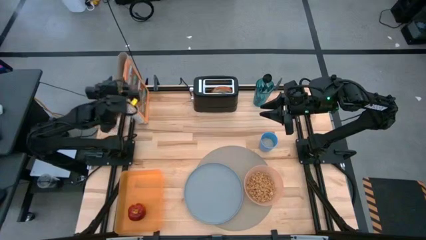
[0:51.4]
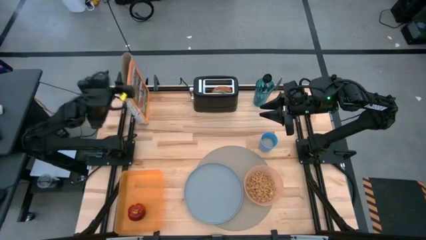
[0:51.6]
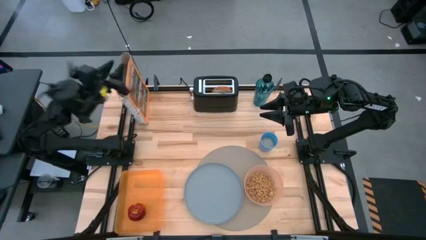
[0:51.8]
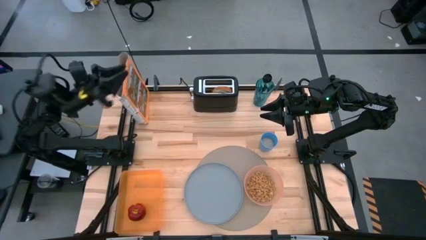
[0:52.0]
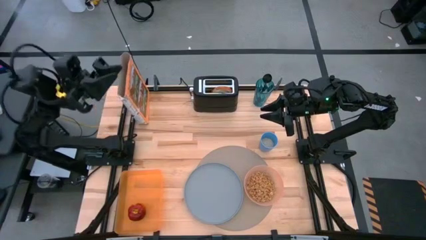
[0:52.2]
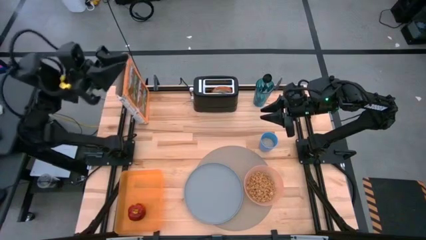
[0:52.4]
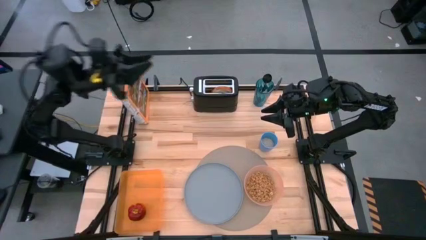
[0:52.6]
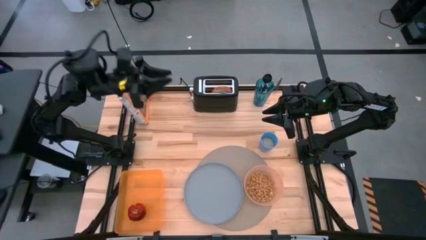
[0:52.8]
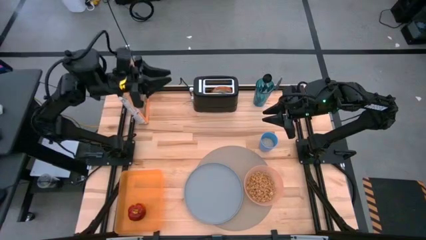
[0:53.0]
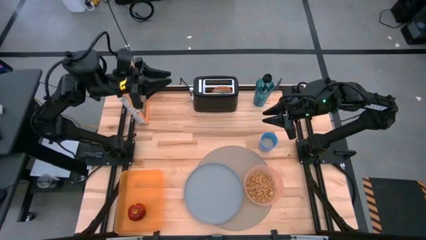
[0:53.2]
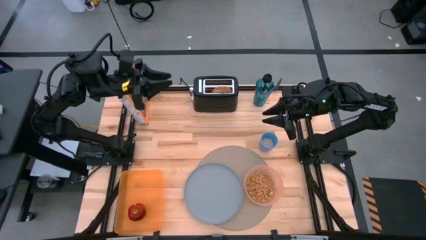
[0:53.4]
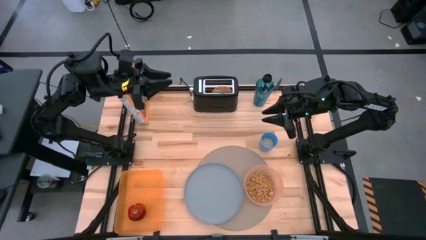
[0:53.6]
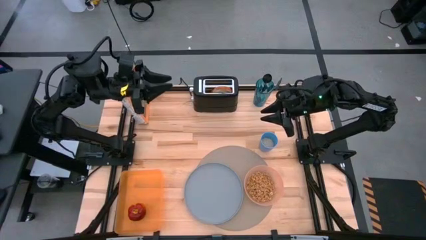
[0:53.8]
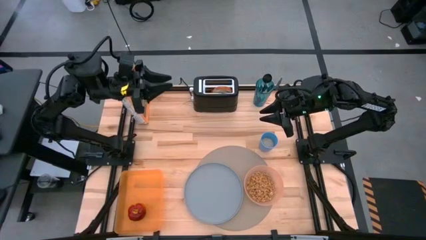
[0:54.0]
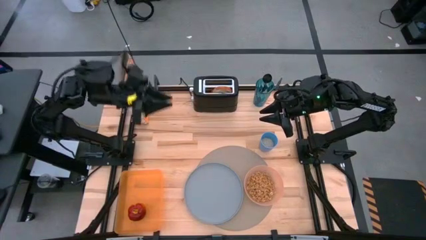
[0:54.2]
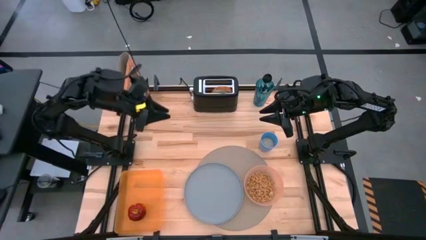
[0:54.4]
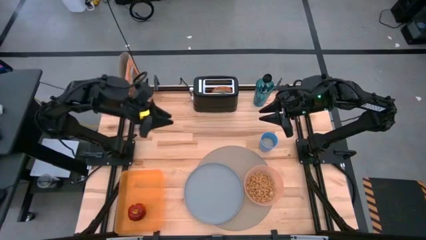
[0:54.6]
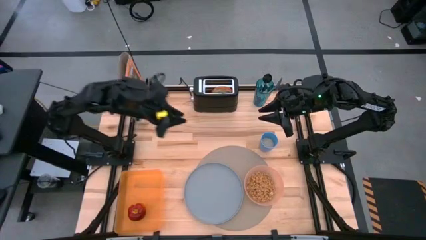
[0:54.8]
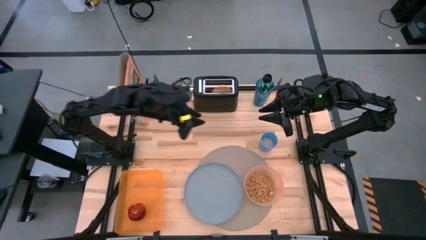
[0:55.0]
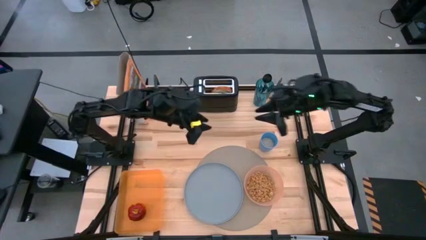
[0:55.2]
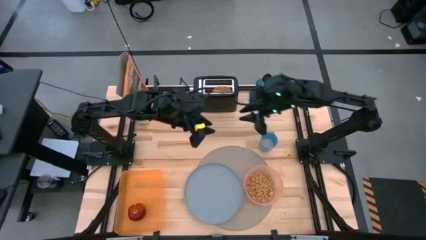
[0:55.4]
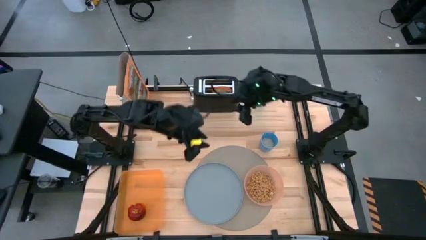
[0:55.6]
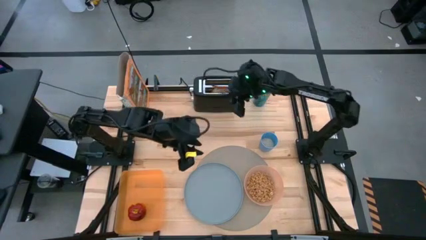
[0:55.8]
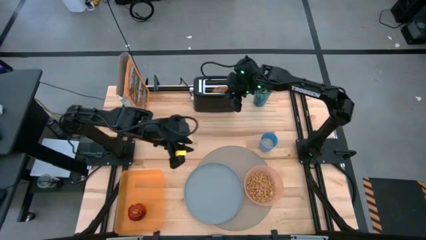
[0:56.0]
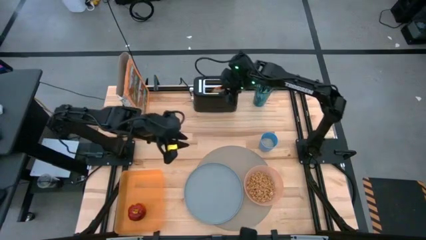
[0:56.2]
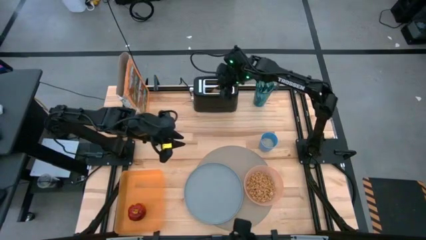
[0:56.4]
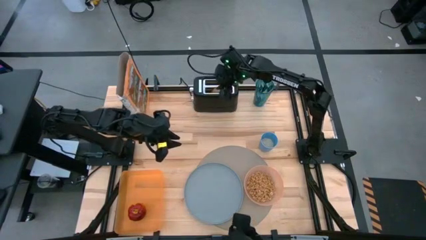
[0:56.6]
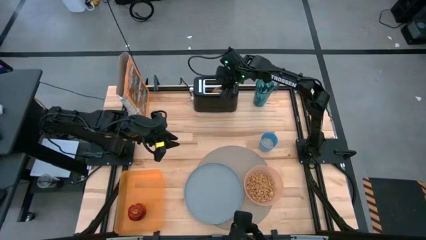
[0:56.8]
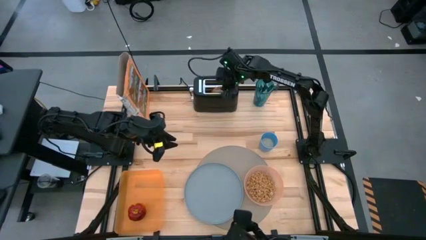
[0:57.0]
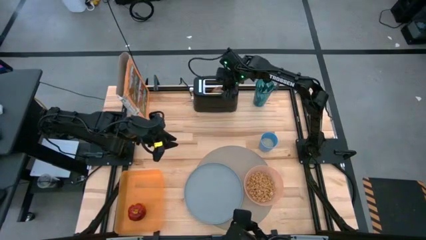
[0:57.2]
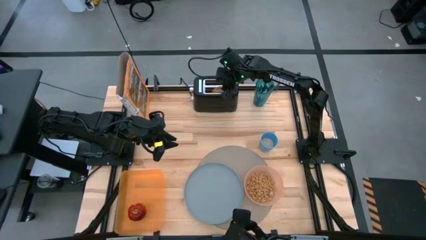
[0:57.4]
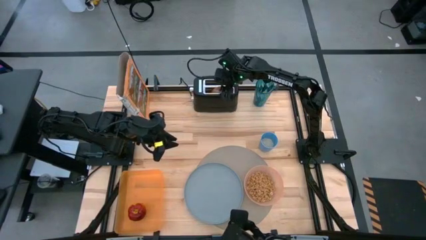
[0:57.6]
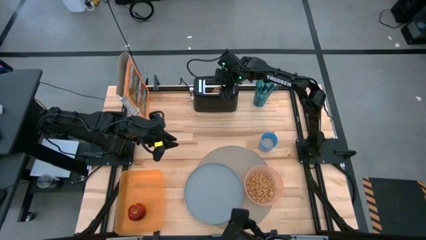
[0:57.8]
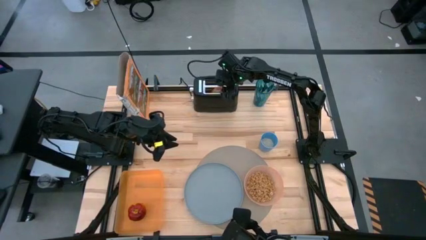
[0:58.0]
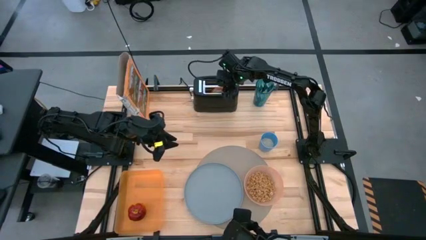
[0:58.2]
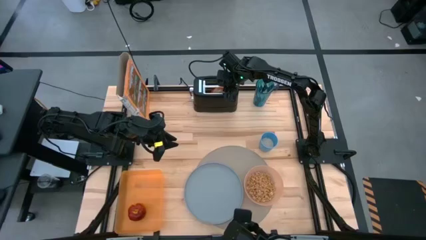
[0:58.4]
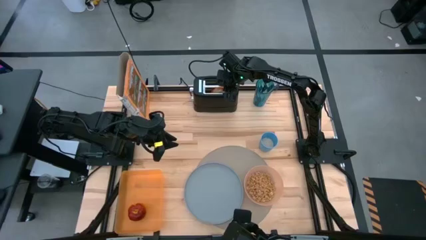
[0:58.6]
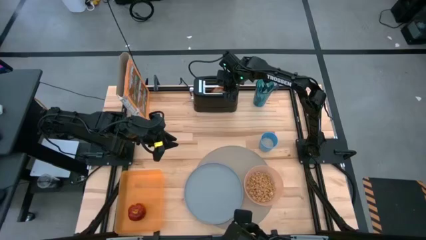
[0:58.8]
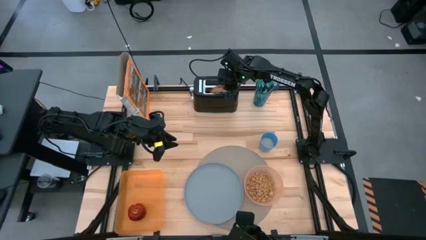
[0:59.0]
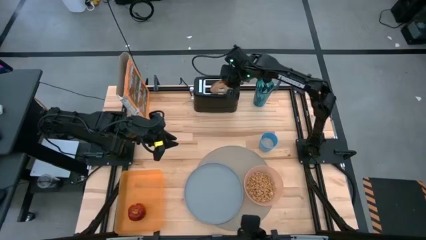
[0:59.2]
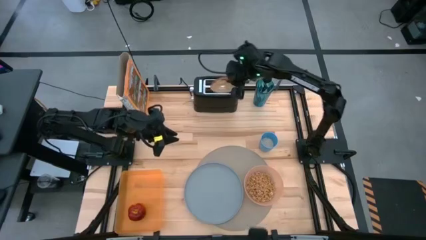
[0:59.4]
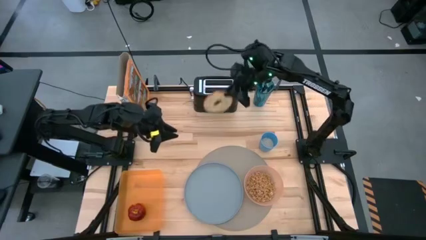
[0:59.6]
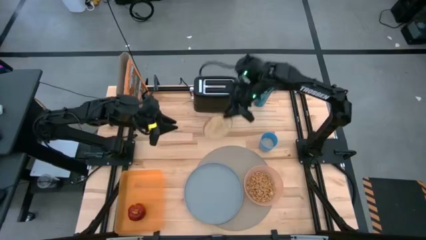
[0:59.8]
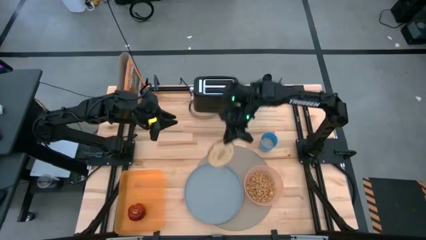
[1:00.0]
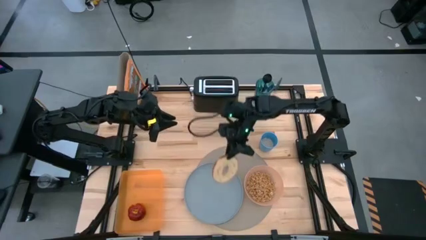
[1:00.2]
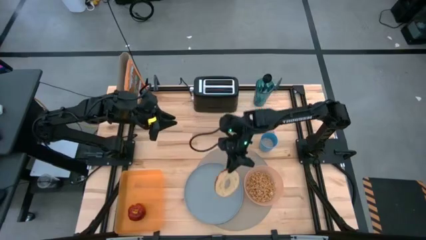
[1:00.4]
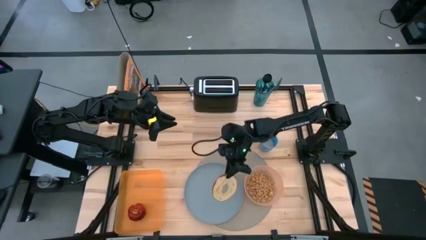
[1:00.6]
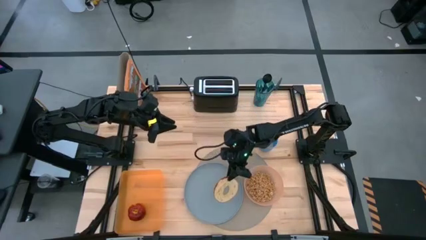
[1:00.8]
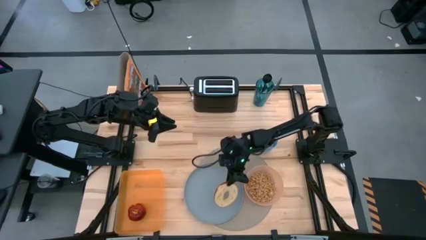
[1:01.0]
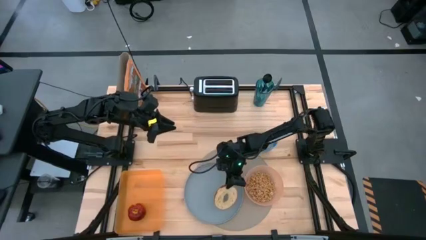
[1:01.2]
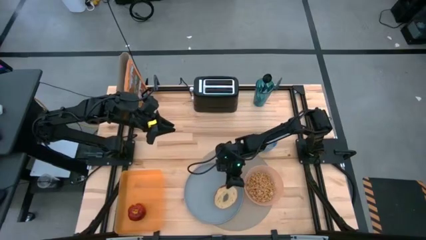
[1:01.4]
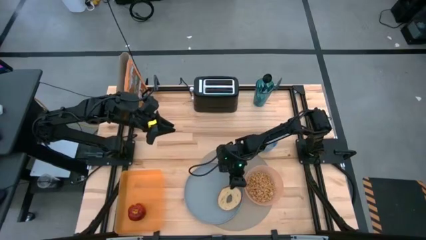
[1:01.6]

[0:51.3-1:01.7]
Task: Arrange a breakfast setting
Put the bagel bread on the blue plate

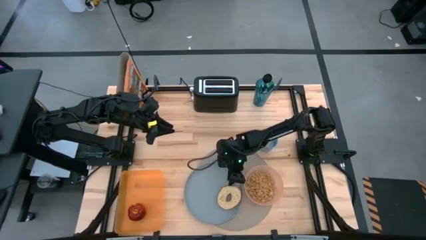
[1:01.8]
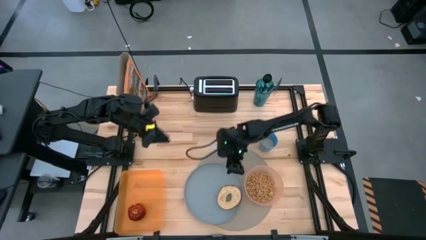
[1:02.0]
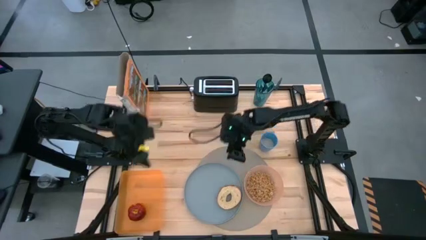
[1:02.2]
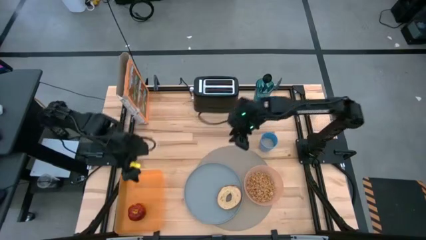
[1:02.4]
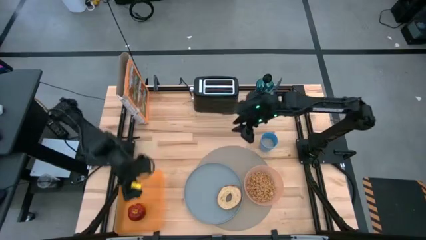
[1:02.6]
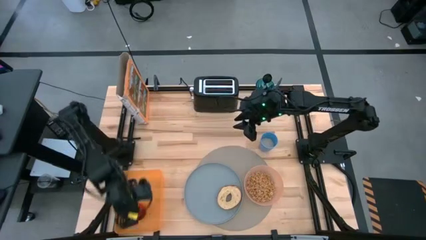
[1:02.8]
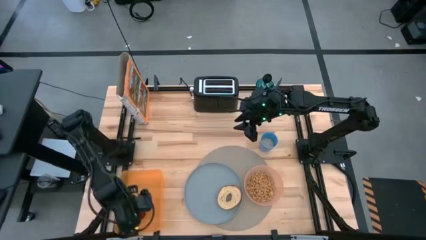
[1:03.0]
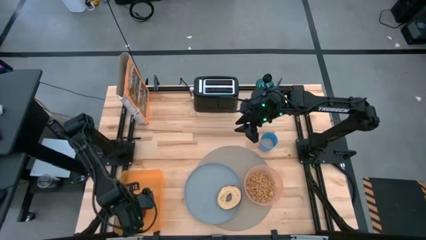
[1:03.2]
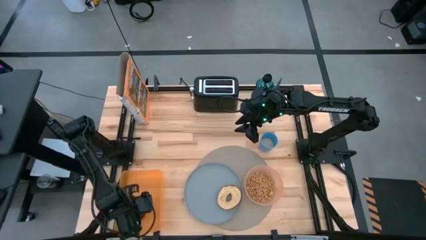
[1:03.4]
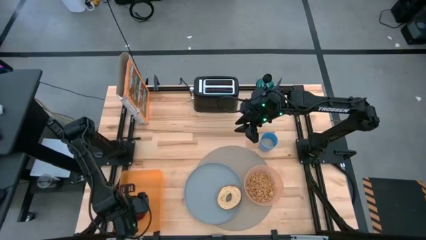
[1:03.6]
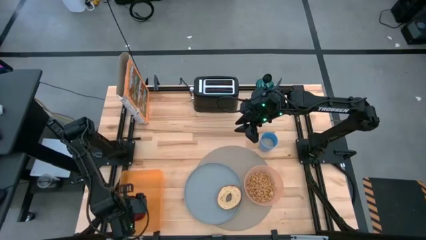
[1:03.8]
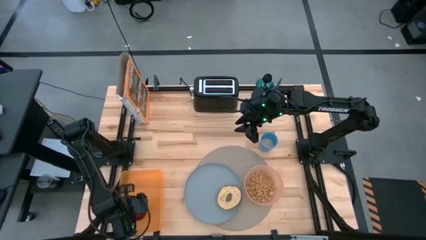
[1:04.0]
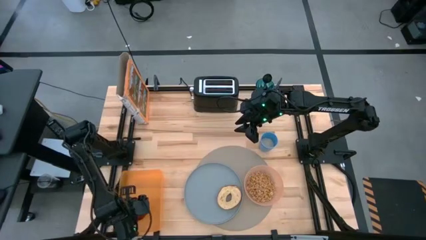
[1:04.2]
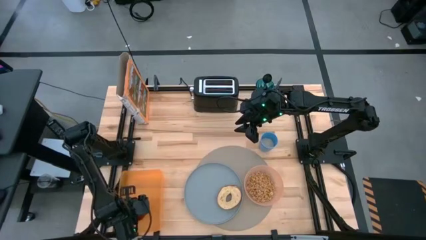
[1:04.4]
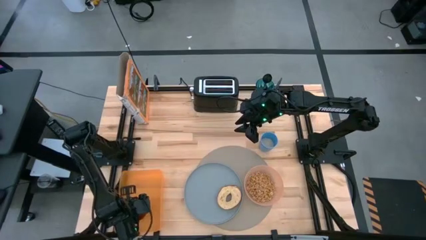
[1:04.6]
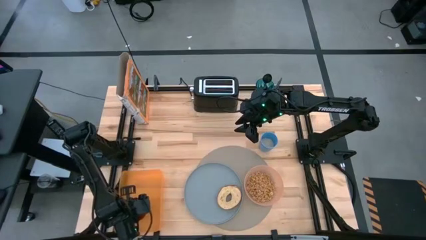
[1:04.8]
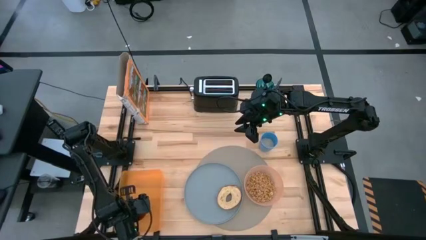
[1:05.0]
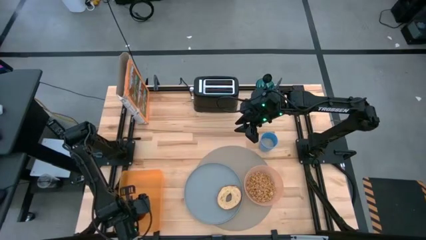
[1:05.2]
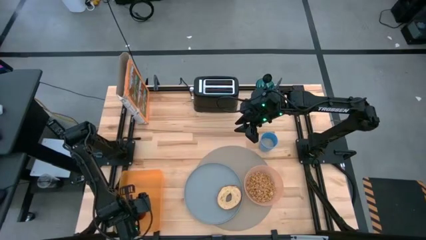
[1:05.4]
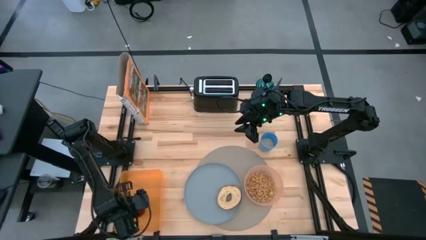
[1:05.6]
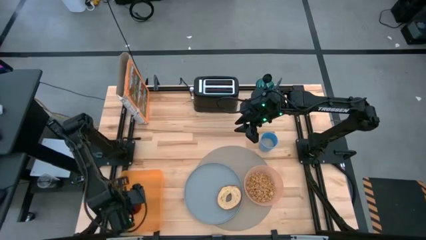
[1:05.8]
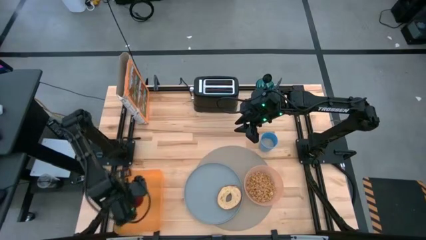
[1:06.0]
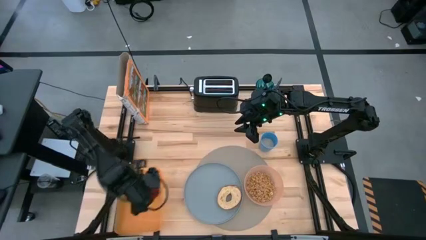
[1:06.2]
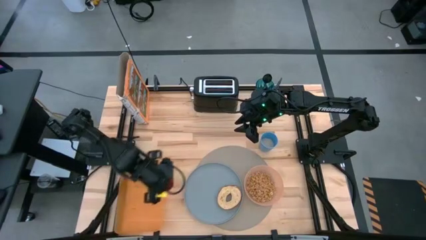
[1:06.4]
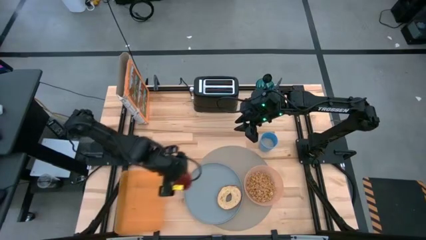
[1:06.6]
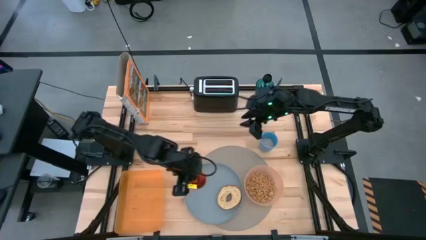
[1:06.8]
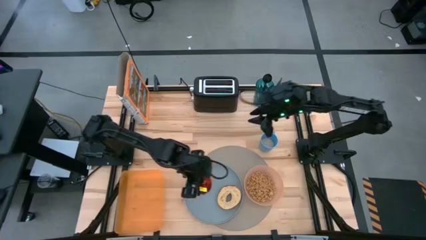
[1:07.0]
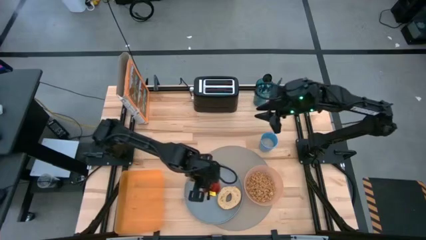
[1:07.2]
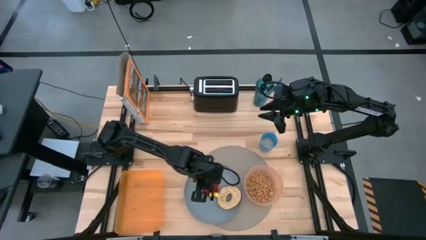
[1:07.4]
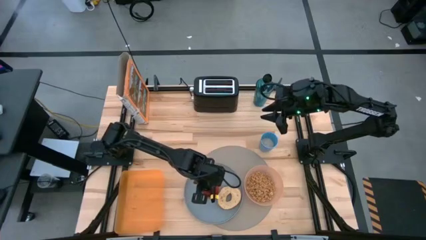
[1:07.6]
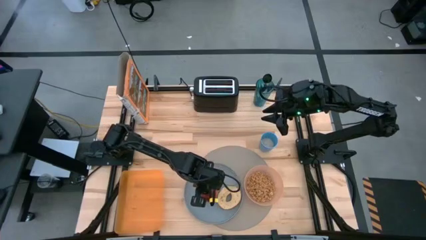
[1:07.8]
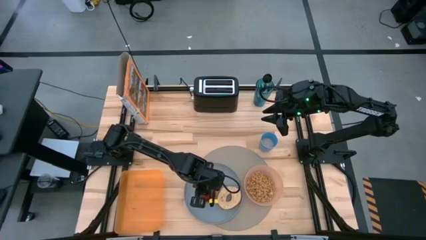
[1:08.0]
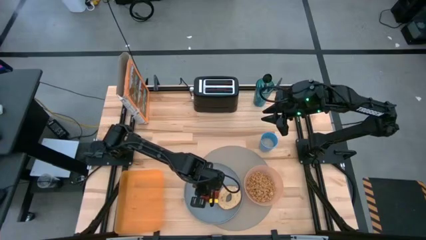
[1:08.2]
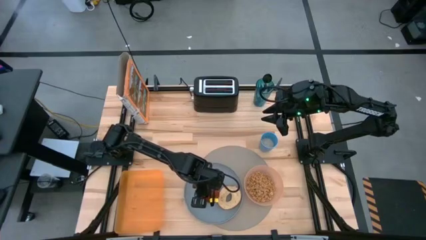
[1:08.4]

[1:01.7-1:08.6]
Put the red apple on the blue plate beside the bagel bread
